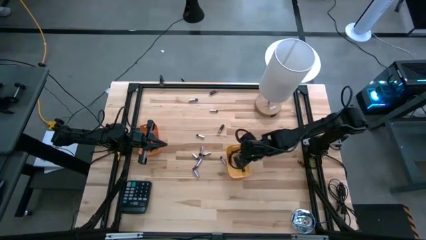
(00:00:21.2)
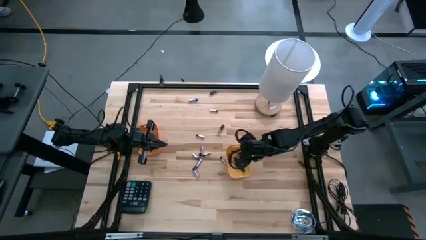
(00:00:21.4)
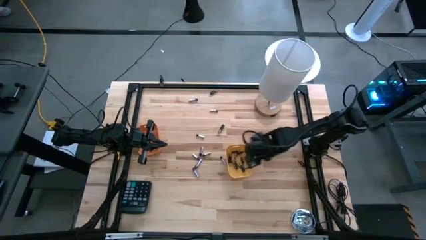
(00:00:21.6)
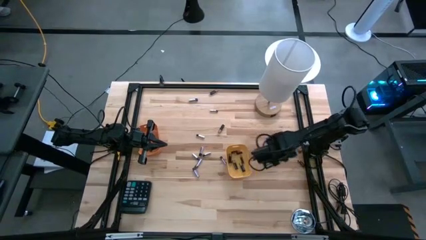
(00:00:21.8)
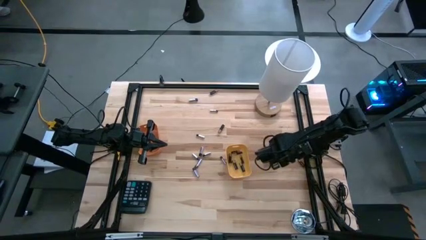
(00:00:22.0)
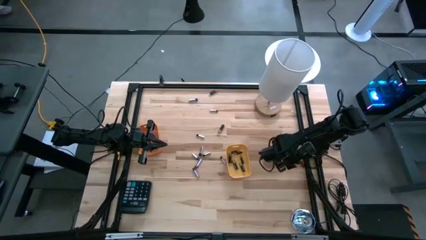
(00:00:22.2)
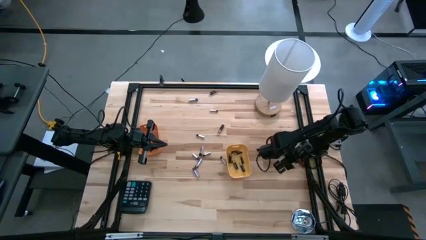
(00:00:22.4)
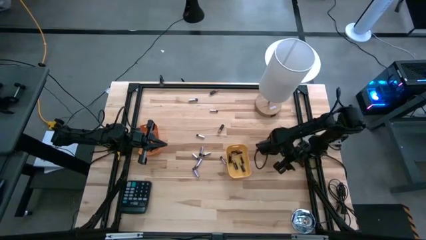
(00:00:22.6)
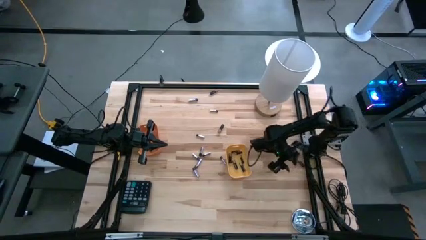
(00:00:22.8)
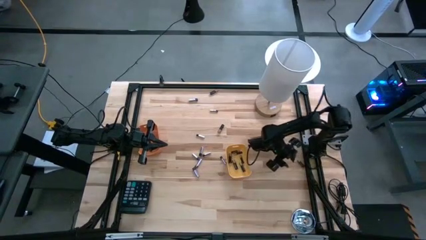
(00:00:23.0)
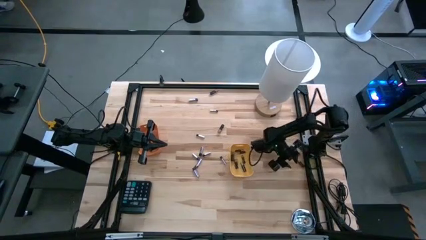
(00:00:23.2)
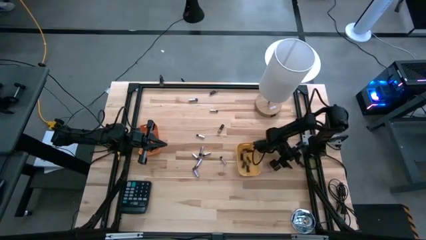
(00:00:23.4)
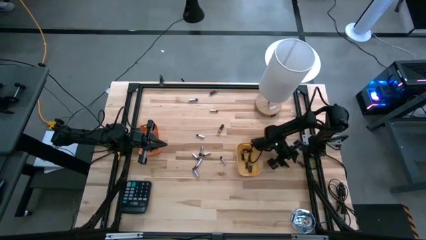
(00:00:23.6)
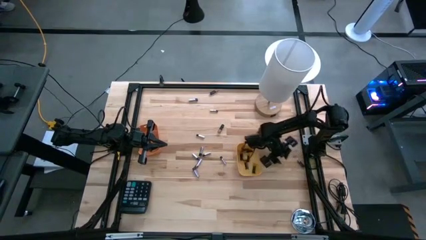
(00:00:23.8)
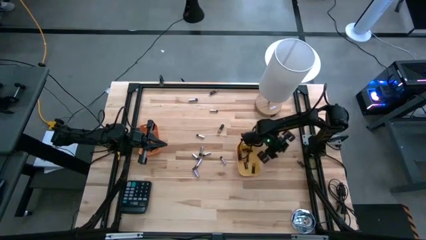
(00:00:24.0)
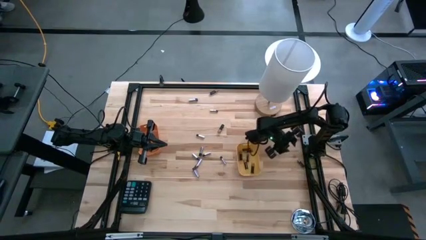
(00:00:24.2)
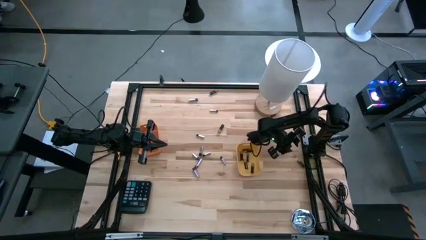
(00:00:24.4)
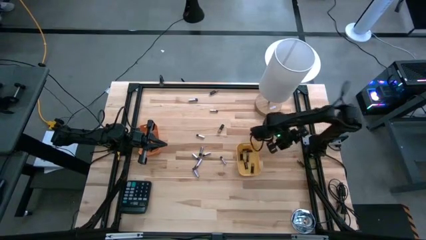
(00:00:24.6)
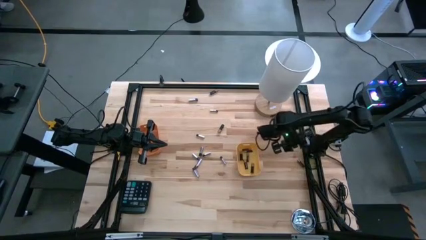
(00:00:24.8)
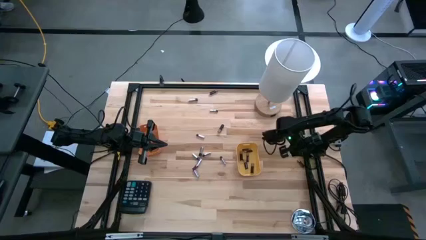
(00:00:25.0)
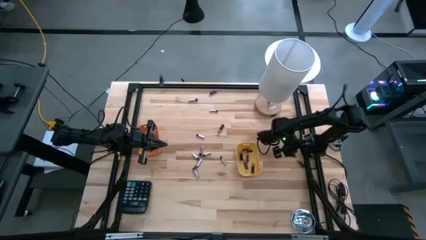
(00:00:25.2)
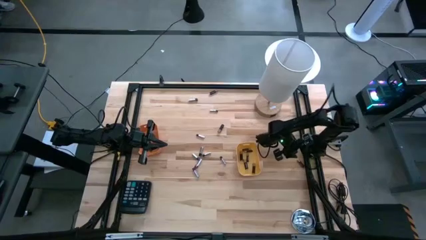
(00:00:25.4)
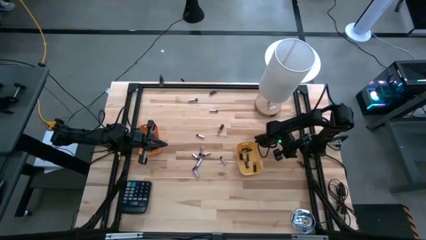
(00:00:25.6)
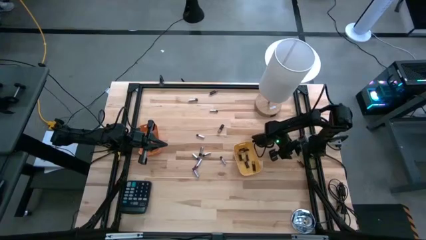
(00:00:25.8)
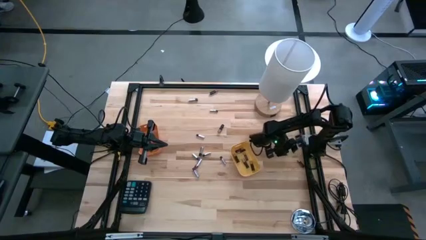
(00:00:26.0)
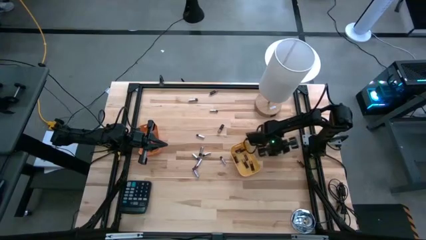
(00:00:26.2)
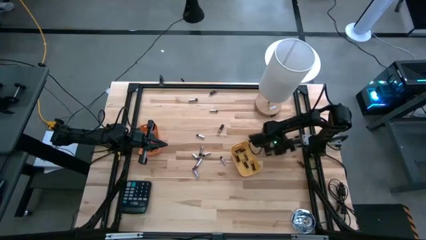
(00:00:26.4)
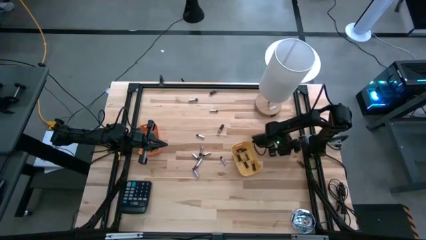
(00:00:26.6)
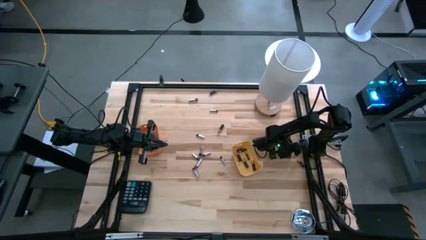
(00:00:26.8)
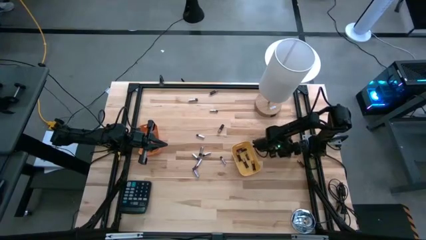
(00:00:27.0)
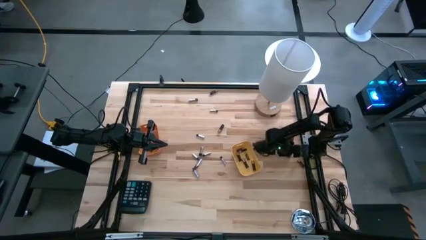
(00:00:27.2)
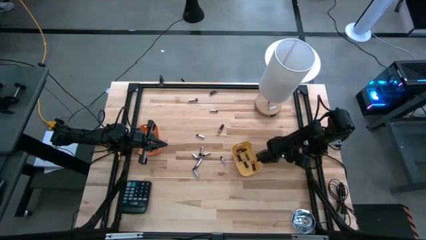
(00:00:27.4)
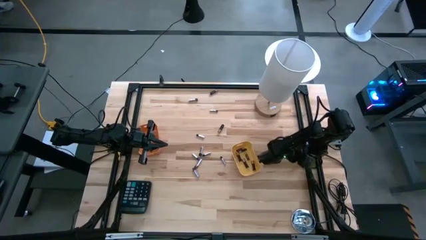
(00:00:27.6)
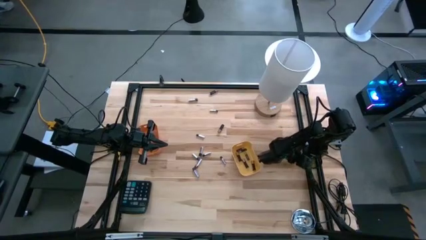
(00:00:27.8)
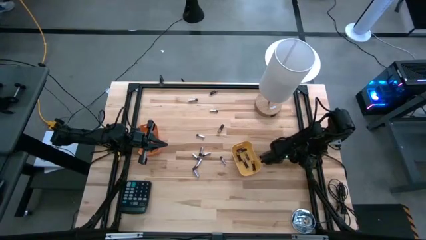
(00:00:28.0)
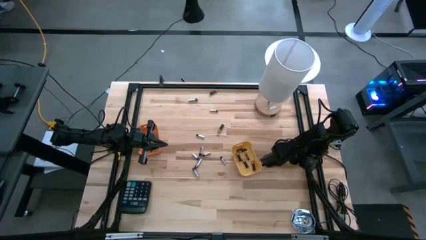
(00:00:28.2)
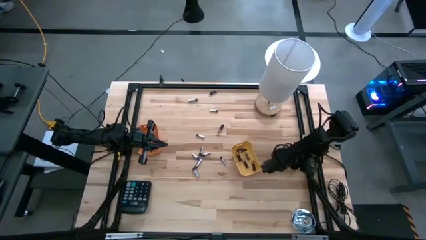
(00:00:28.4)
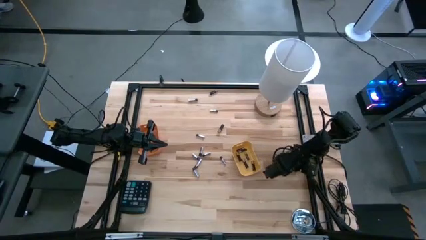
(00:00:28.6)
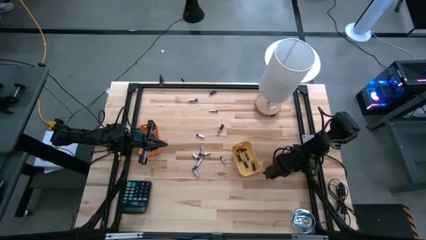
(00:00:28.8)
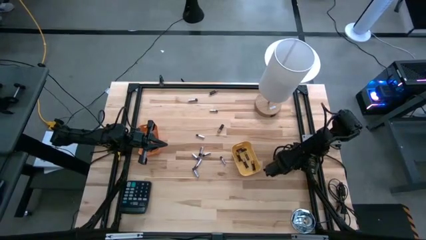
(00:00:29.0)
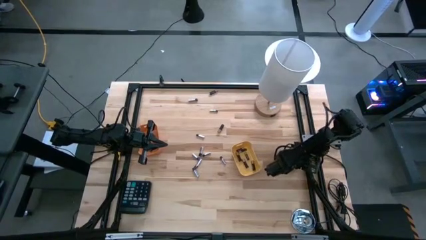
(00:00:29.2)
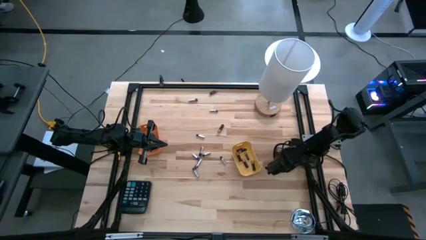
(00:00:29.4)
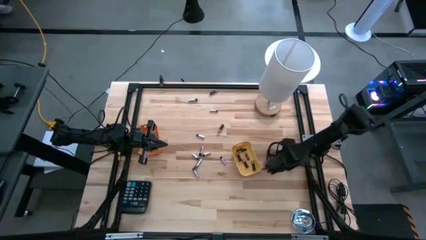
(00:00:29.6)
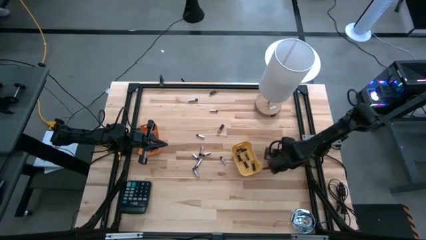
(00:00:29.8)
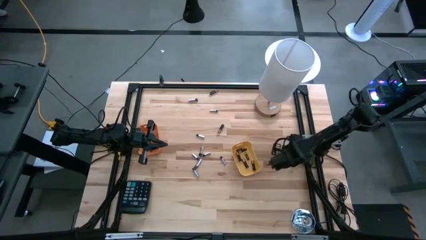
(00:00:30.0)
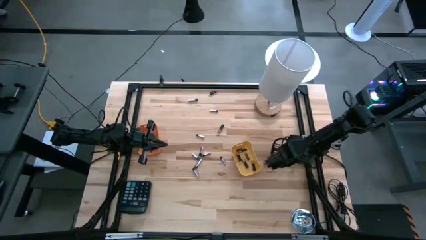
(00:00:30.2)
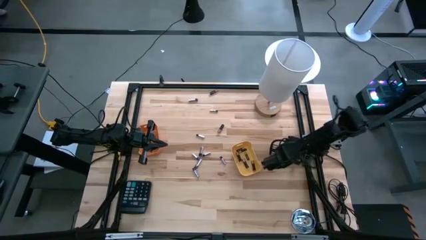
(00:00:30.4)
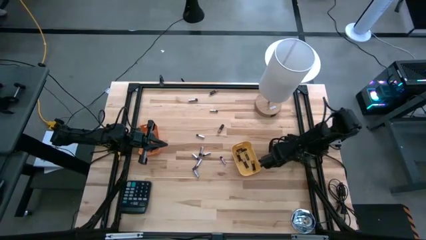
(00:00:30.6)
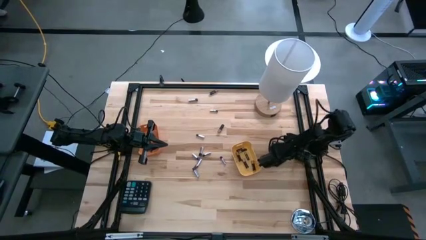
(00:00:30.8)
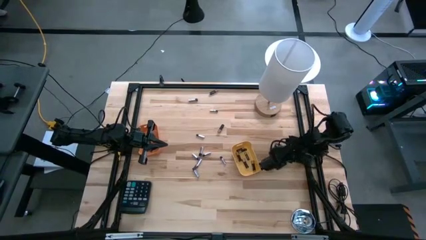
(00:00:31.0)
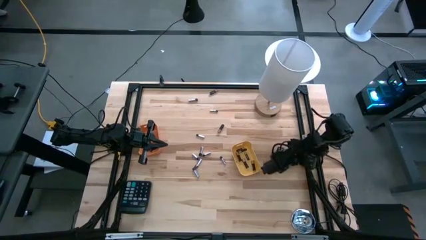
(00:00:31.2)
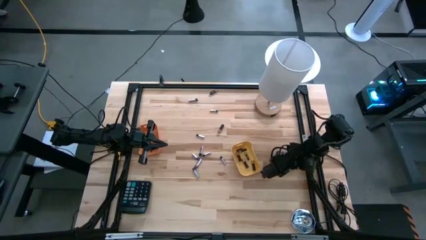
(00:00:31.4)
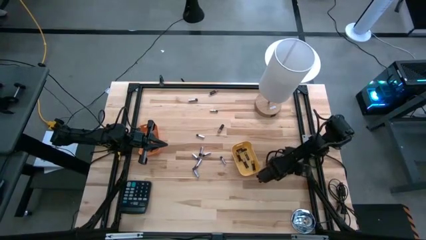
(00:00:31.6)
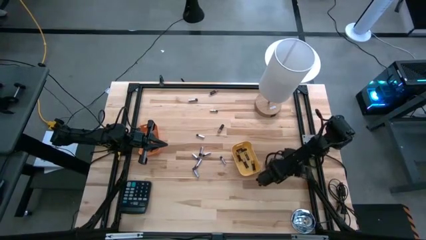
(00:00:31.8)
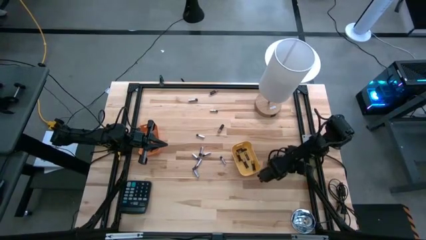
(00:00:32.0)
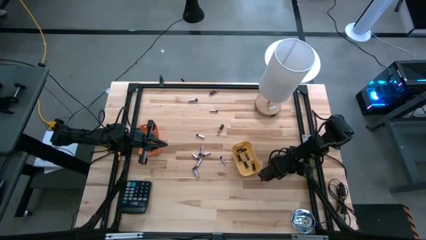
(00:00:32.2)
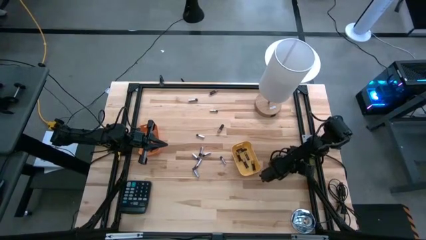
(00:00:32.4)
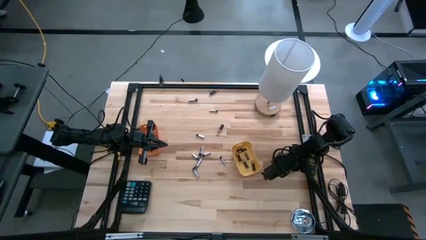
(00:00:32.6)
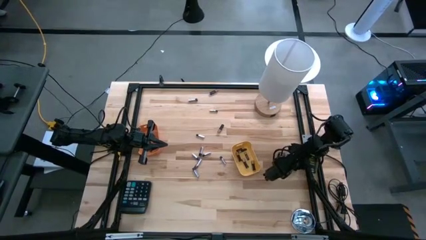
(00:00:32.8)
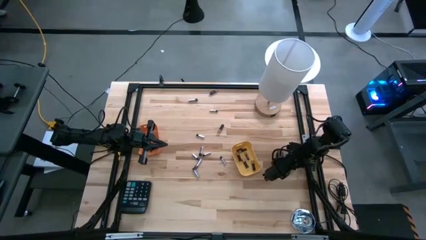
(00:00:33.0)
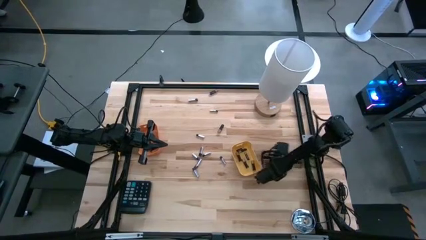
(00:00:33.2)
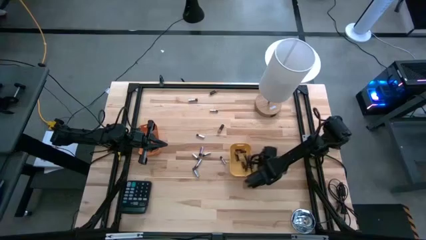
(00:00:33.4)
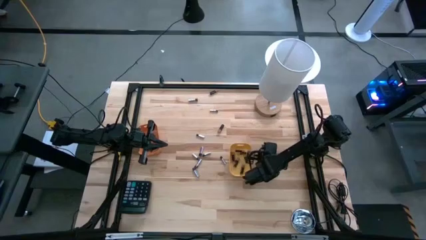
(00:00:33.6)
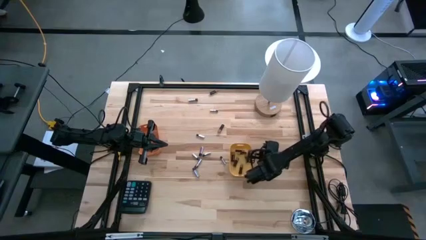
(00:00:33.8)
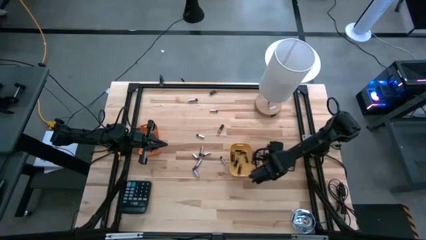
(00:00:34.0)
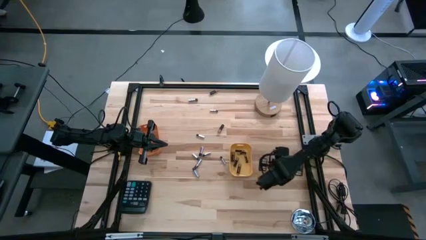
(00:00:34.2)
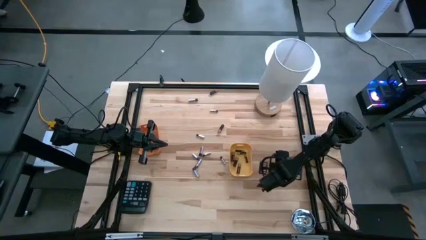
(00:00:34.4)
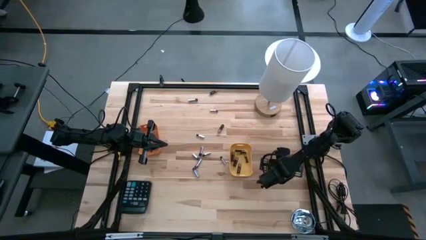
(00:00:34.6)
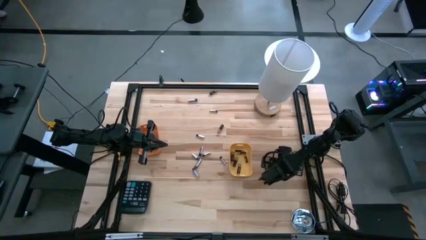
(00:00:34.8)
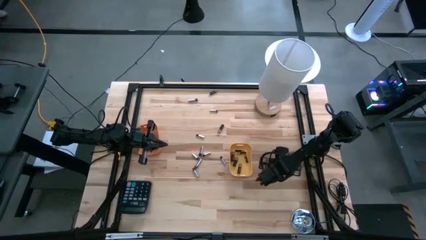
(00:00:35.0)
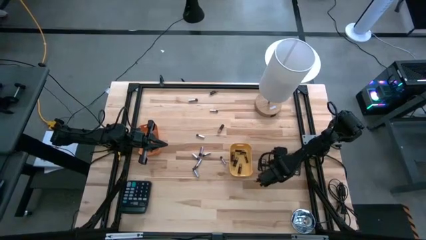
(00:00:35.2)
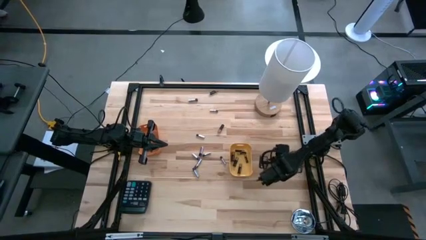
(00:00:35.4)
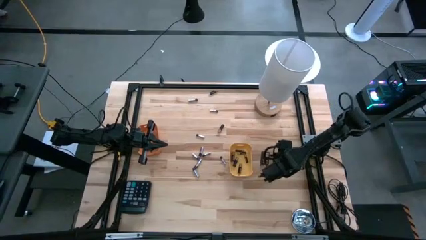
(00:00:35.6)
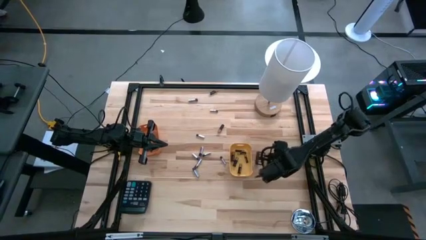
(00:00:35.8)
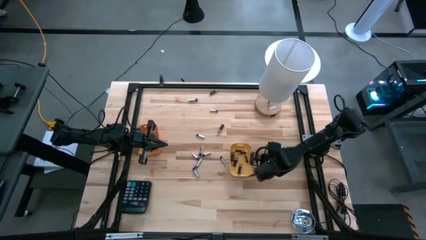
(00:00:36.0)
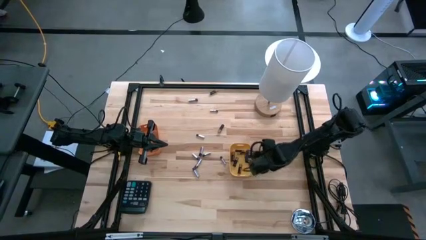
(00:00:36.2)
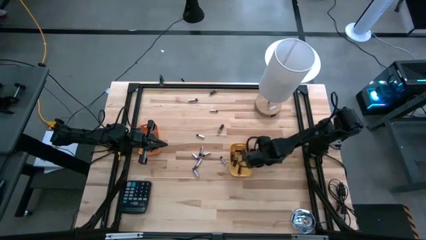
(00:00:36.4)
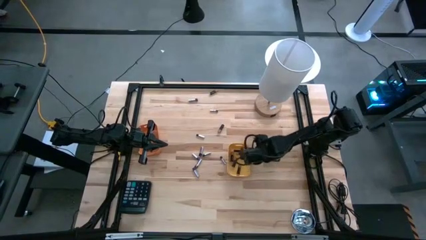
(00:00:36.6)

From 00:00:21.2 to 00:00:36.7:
Task: Sort batteries
Put the black battery into the yellow bin

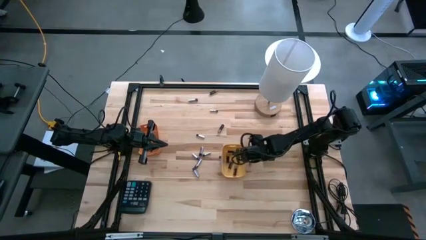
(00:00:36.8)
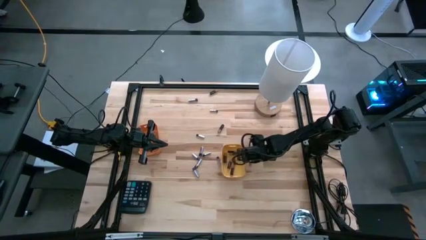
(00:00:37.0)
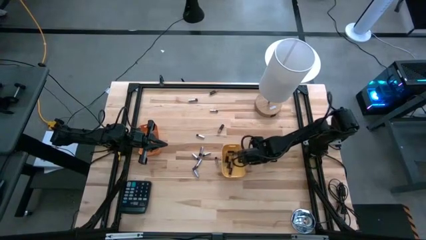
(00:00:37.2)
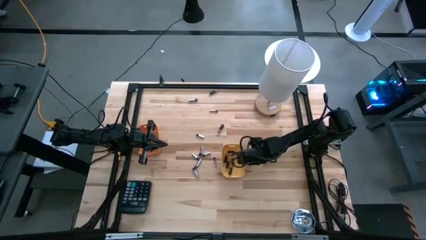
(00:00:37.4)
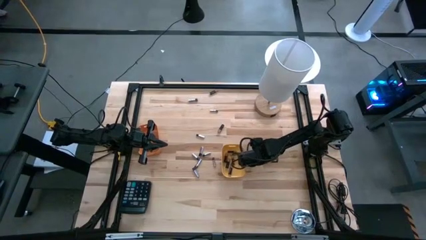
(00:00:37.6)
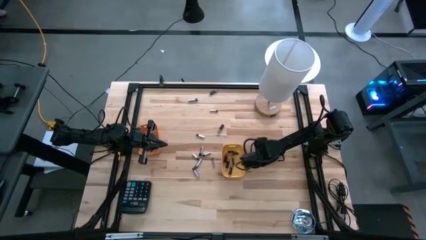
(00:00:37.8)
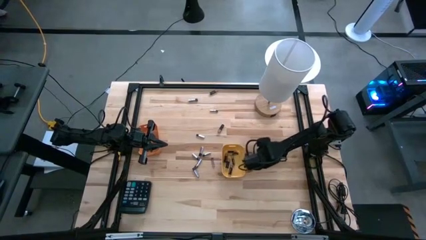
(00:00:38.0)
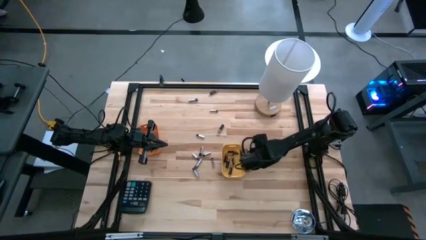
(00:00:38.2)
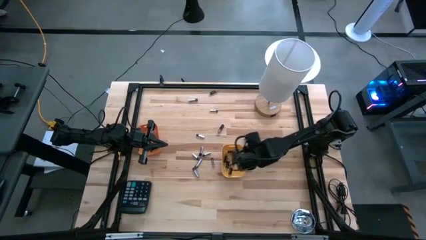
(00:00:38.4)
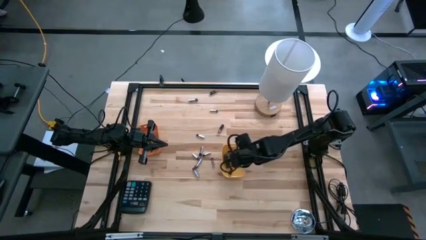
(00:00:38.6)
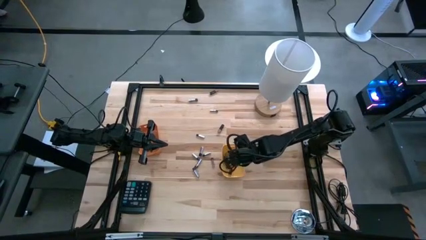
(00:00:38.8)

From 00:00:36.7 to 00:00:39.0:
Put the black battery into the yellow bin
